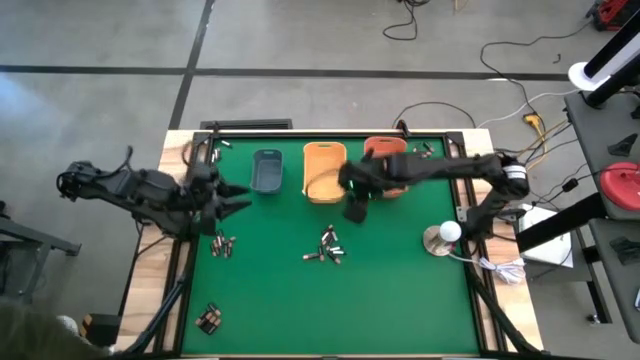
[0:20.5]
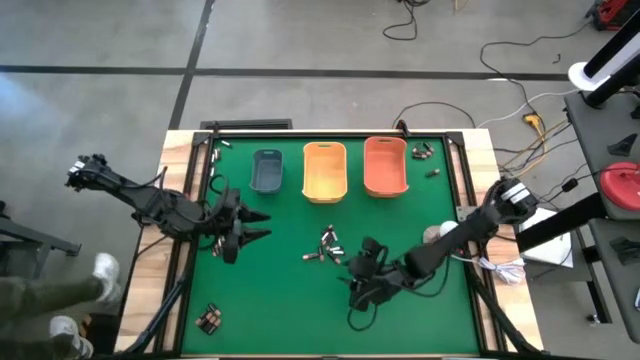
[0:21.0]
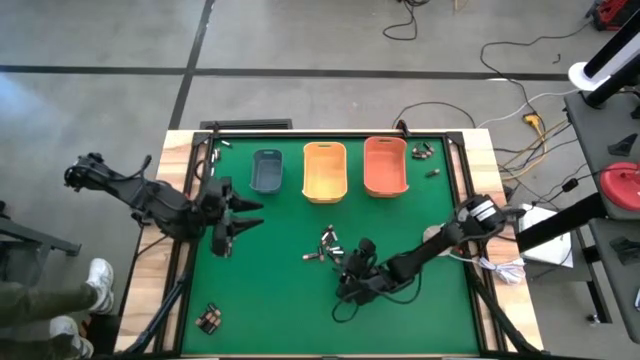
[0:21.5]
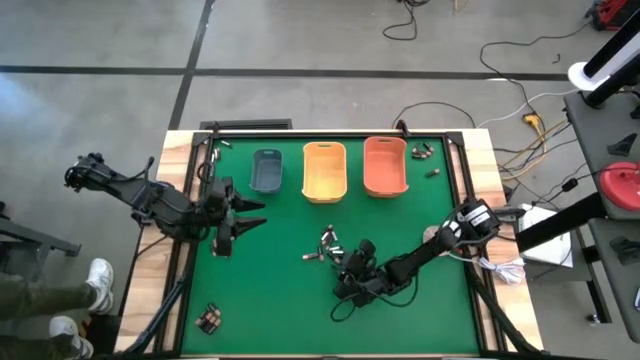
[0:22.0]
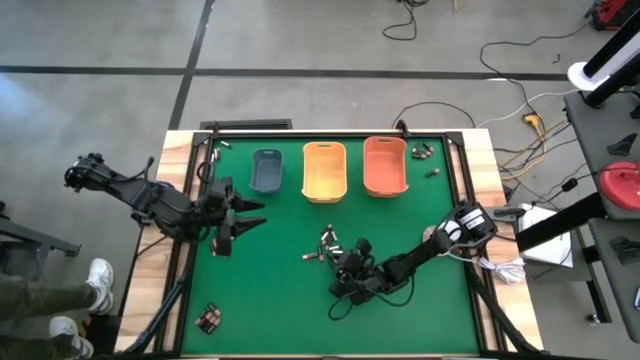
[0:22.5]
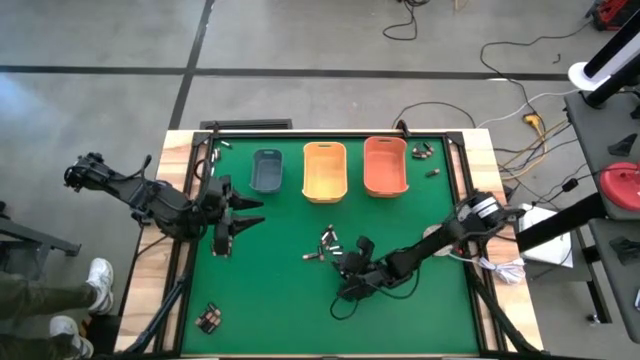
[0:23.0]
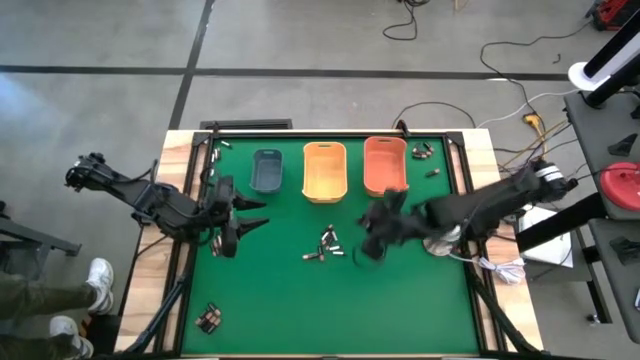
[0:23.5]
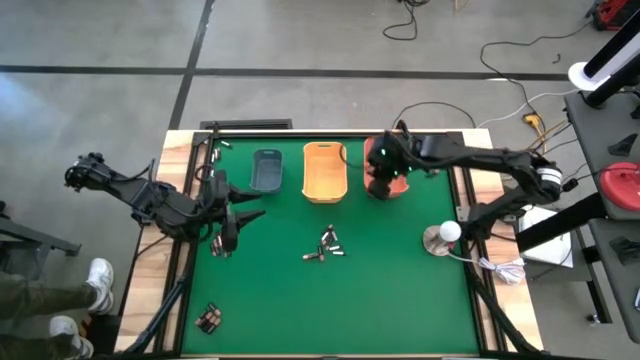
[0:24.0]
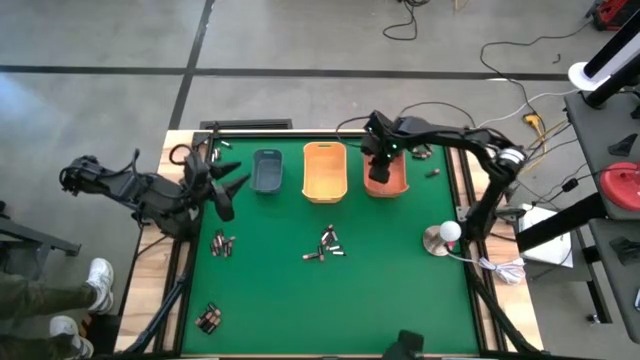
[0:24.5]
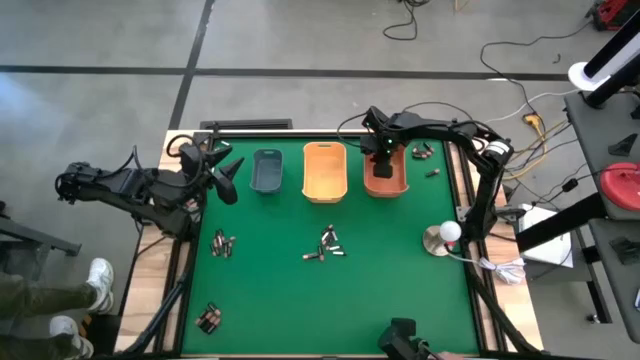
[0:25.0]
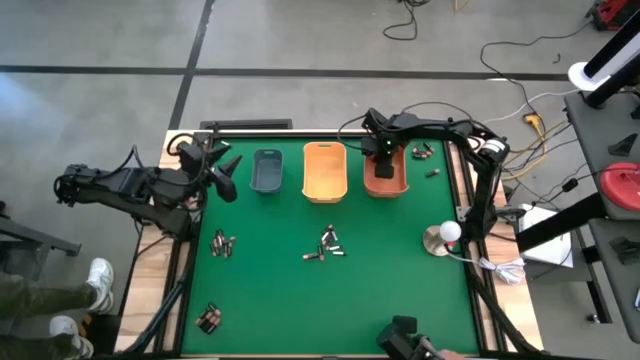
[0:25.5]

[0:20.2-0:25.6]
Task: Sort batteries
Put the black battery into the orange bin

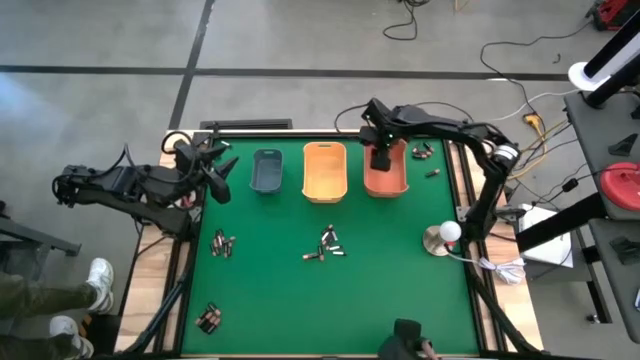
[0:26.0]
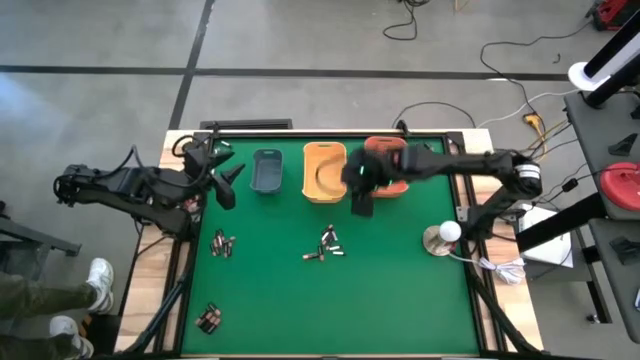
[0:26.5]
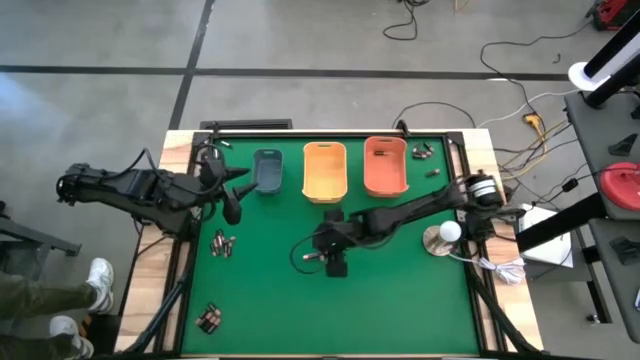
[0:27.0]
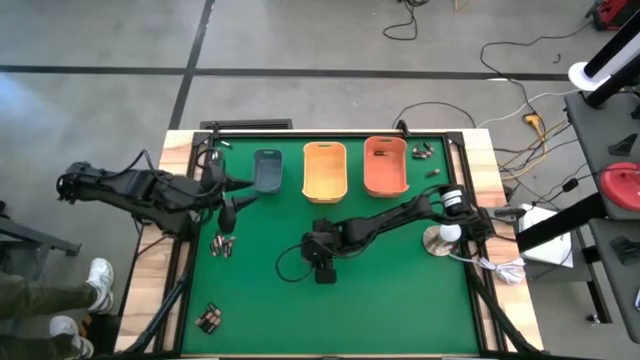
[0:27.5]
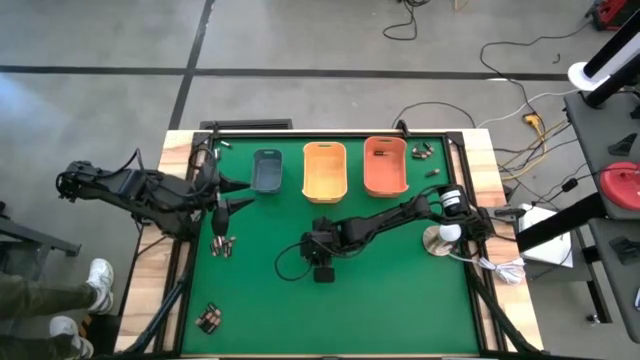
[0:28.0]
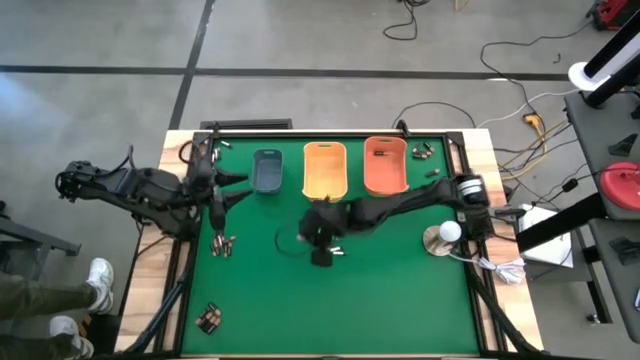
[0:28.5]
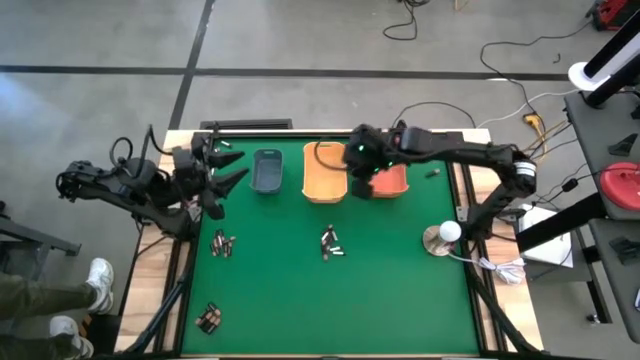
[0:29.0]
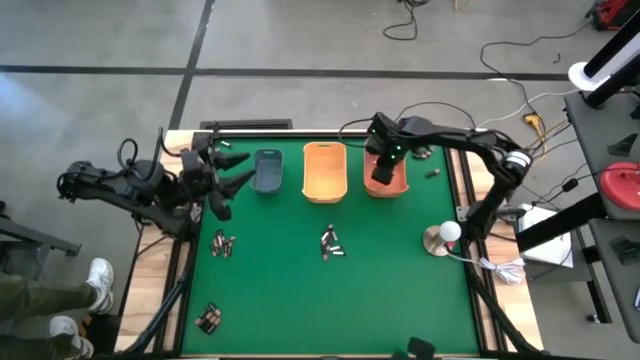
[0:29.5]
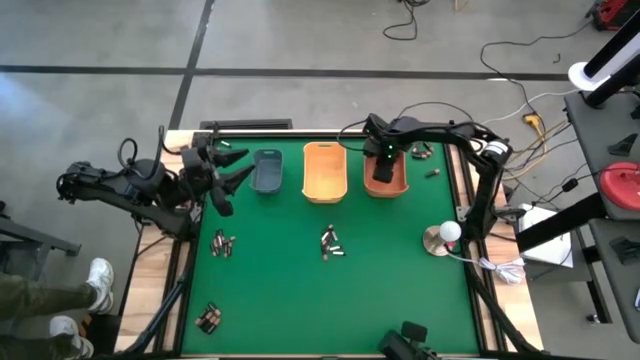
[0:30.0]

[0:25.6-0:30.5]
Put the black battery into the orange bin

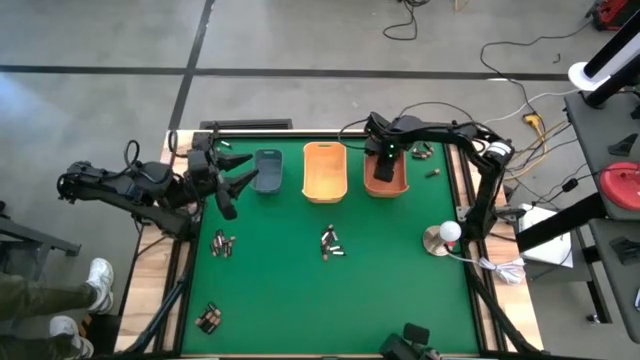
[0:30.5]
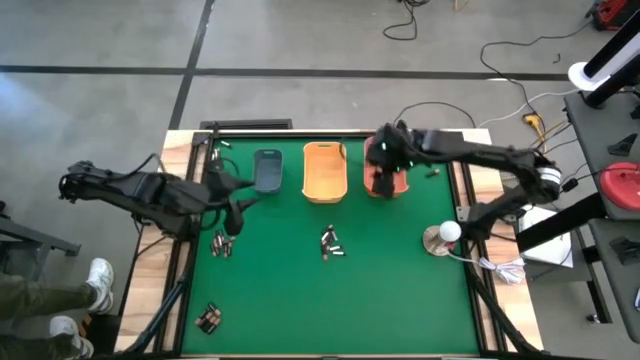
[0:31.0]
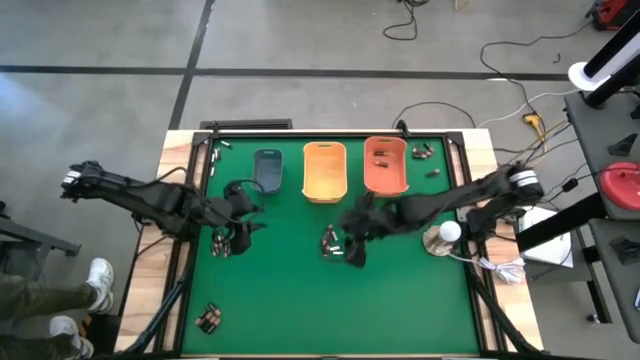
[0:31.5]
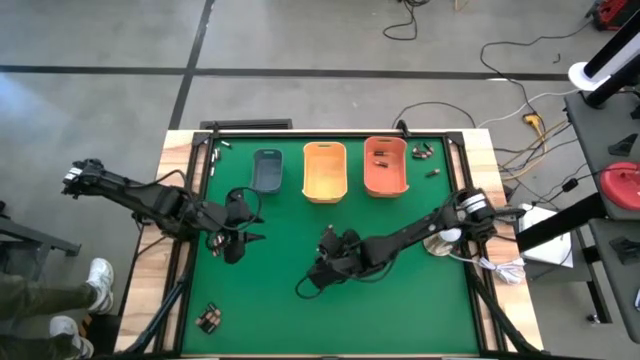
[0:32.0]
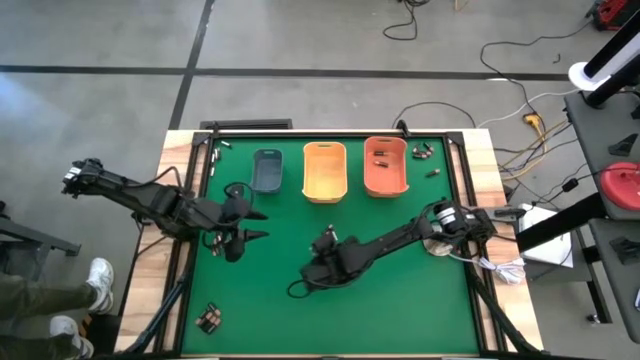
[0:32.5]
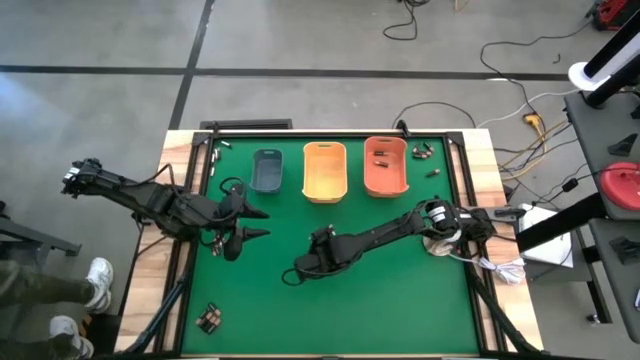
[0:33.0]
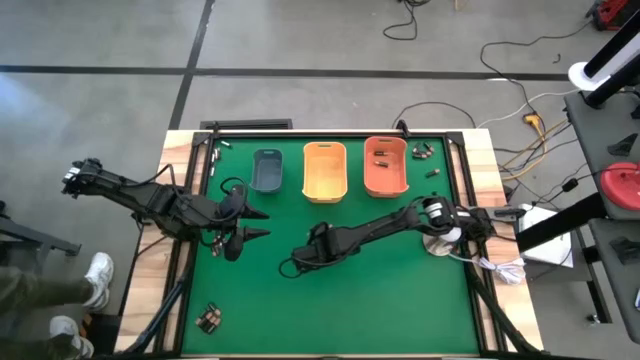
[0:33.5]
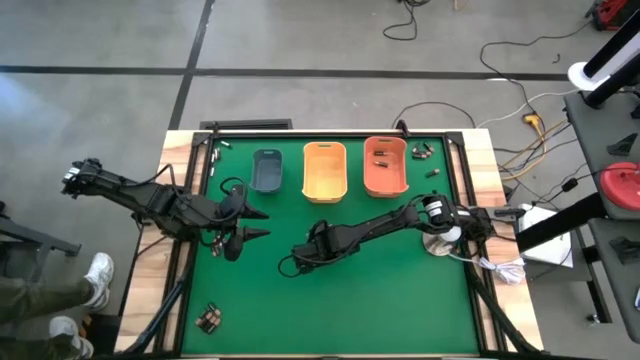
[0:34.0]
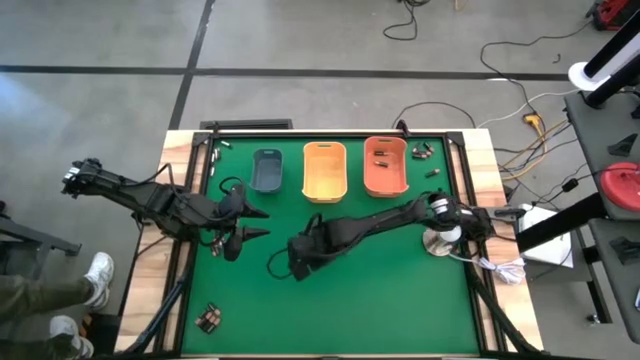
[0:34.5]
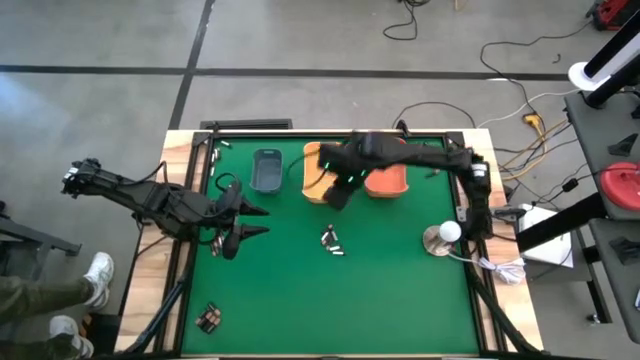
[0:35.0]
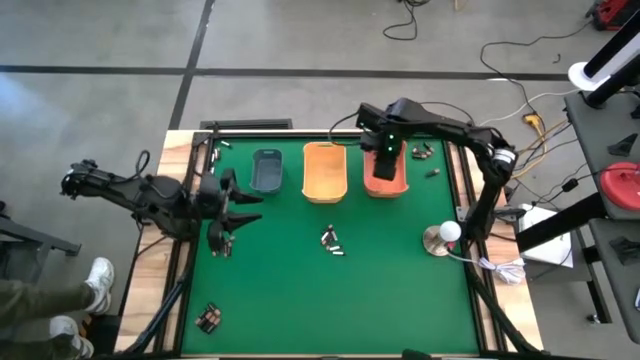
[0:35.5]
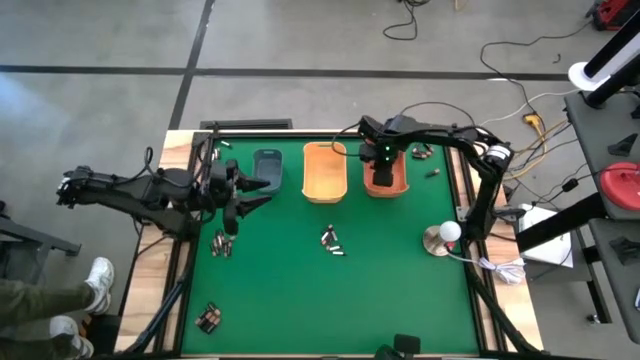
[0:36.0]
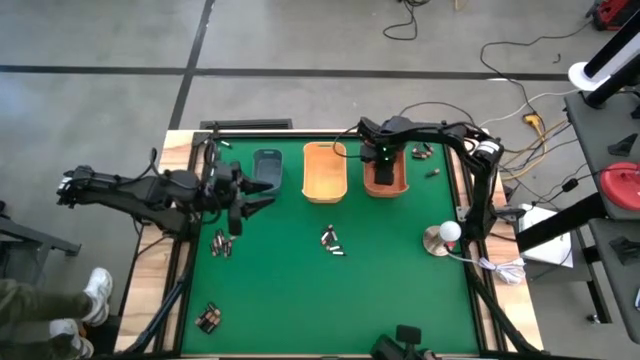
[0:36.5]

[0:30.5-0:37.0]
Put the black battery into the orange bin

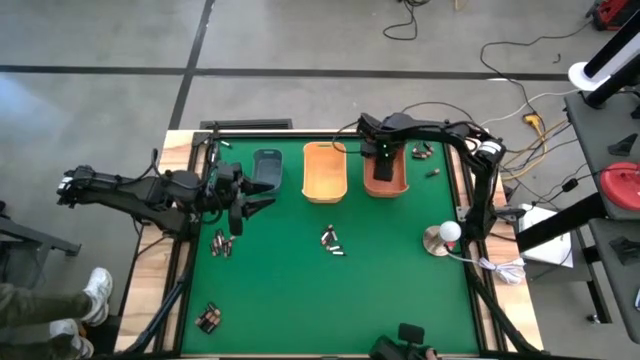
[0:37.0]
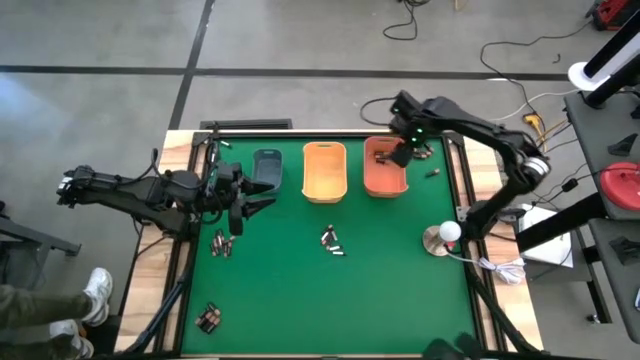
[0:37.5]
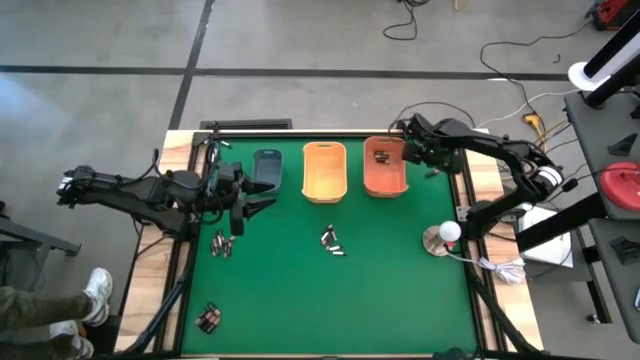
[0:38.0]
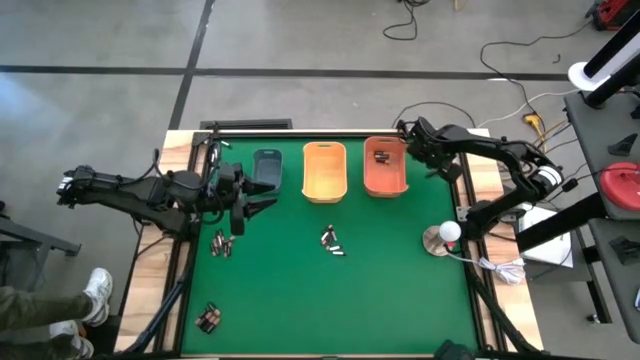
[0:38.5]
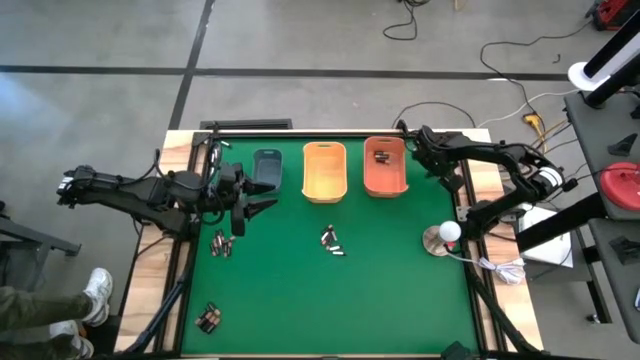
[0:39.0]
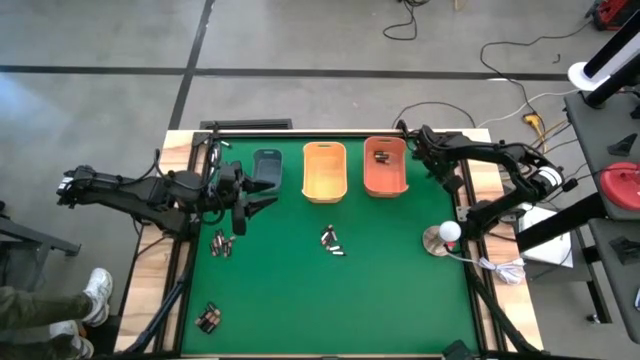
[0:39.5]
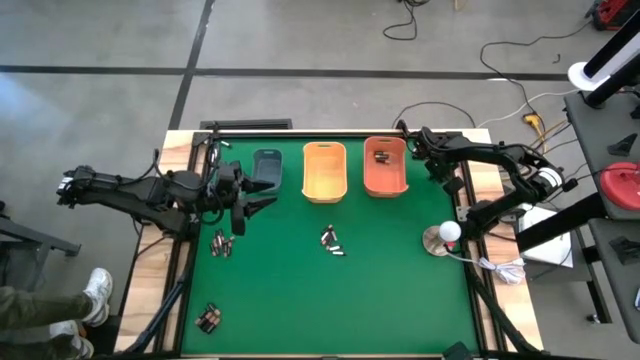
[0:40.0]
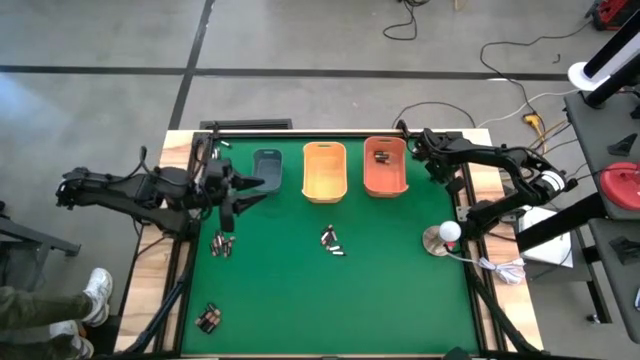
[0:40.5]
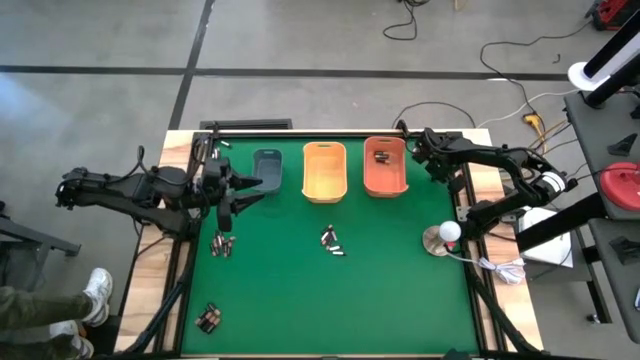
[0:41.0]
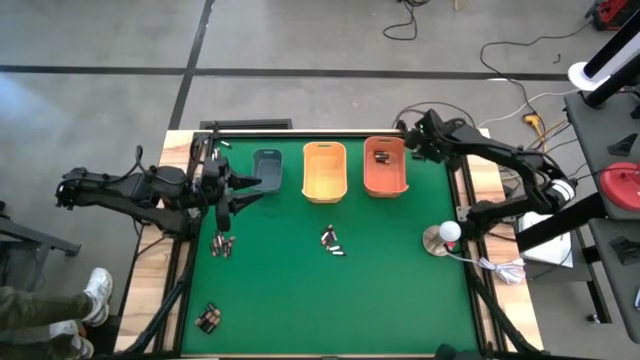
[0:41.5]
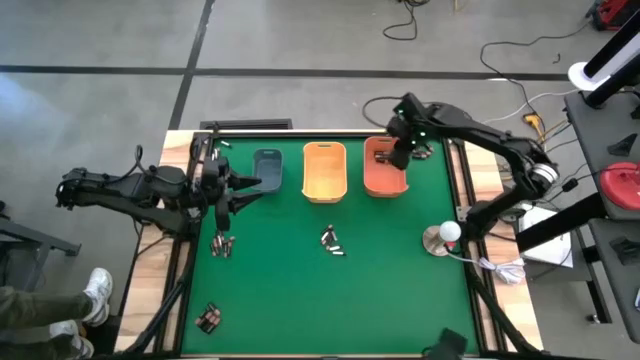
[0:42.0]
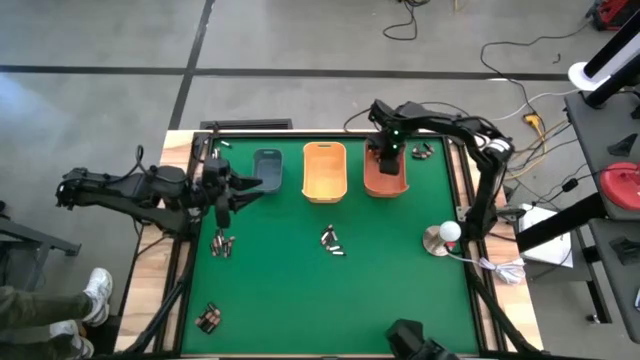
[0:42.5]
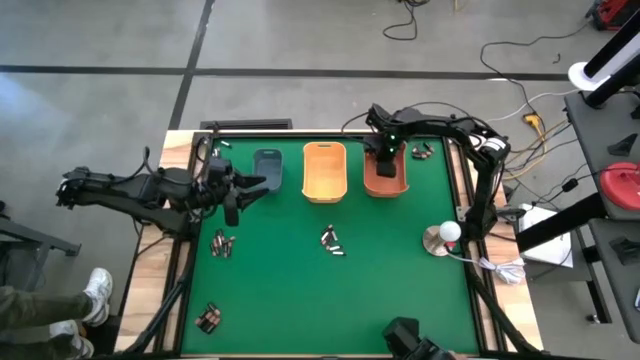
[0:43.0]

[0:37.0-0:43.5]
Put the black battery into the orange bin
